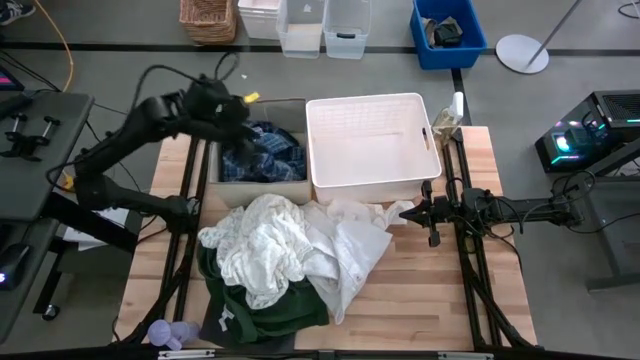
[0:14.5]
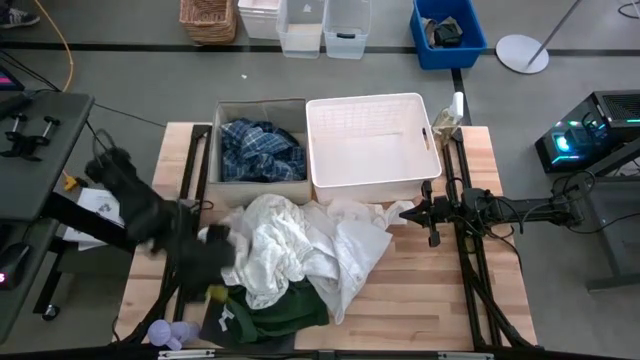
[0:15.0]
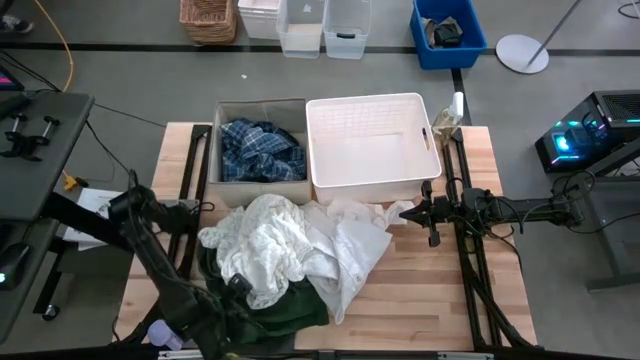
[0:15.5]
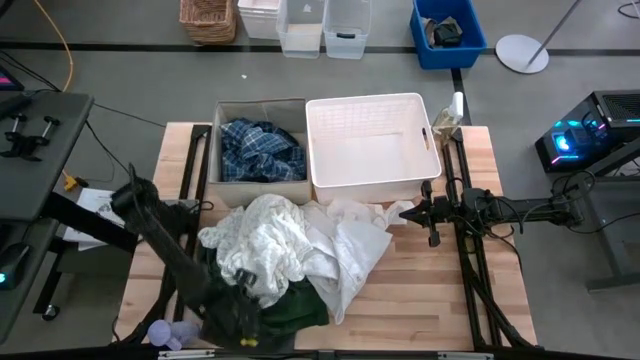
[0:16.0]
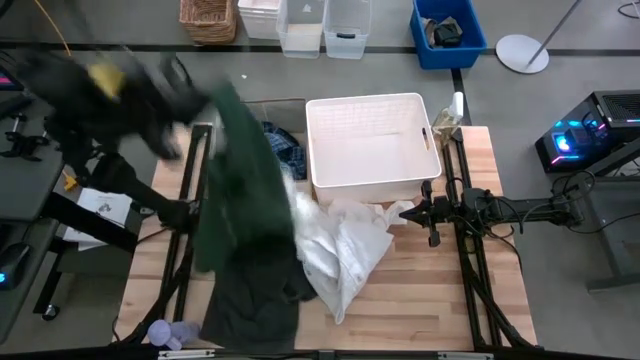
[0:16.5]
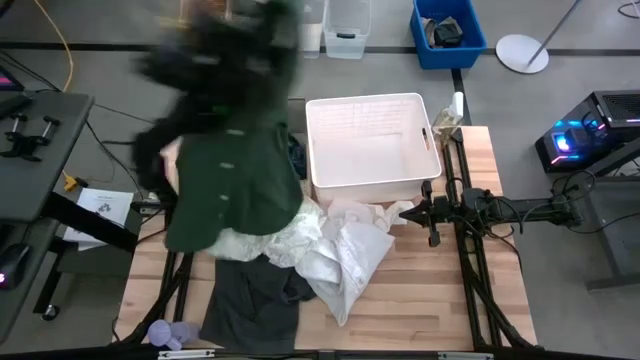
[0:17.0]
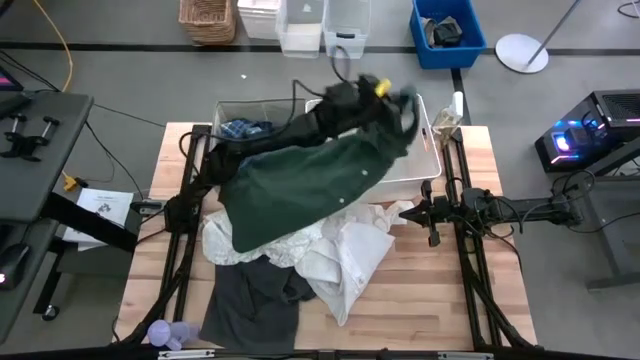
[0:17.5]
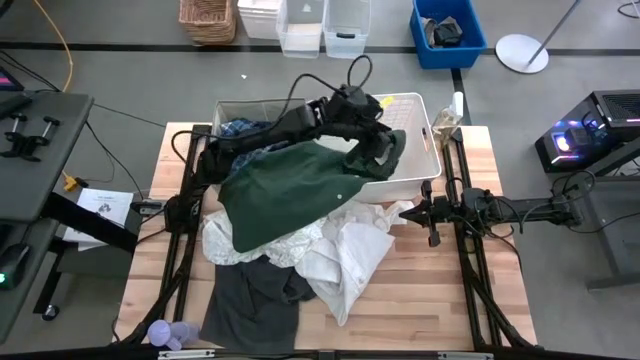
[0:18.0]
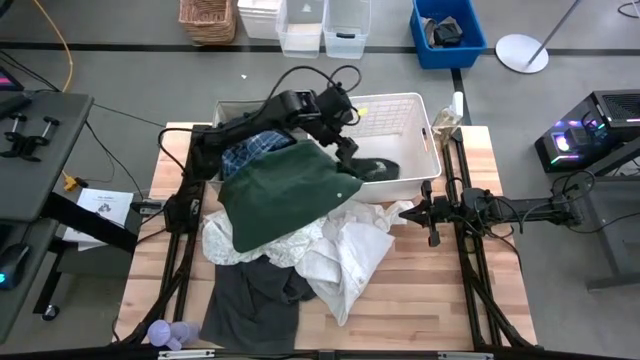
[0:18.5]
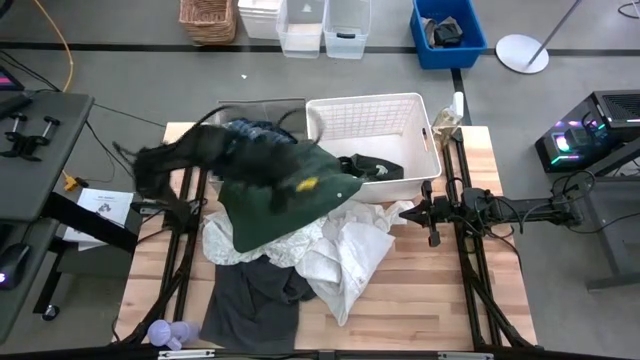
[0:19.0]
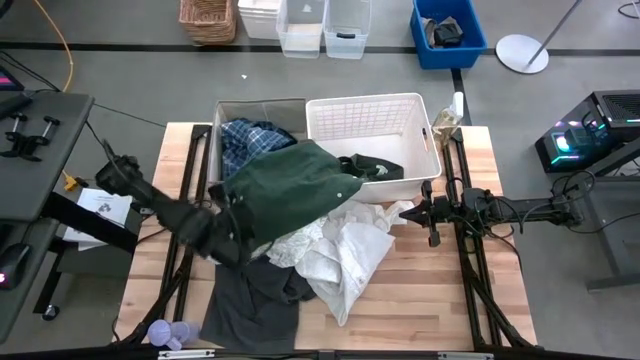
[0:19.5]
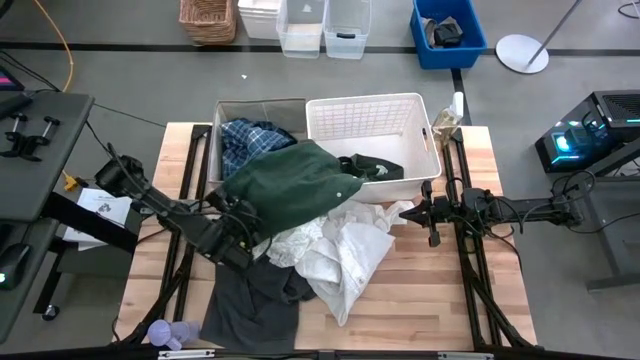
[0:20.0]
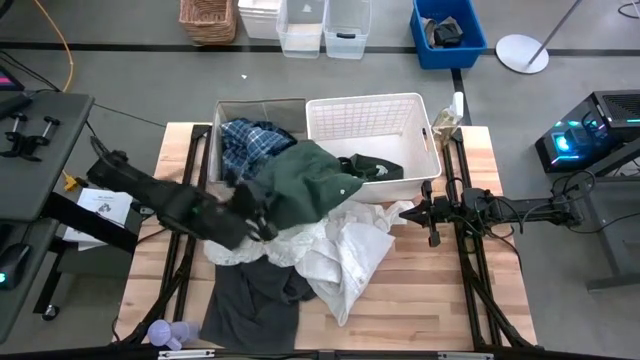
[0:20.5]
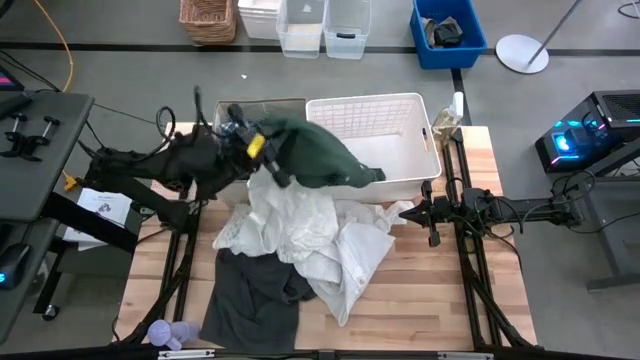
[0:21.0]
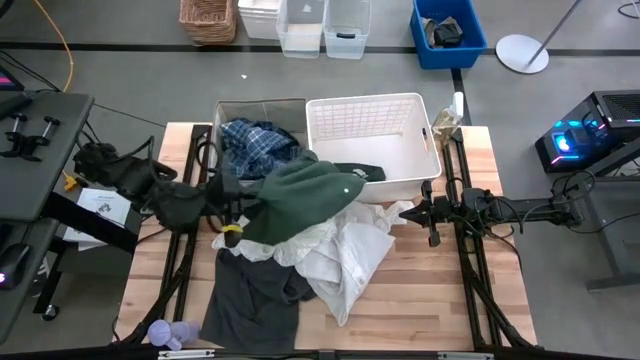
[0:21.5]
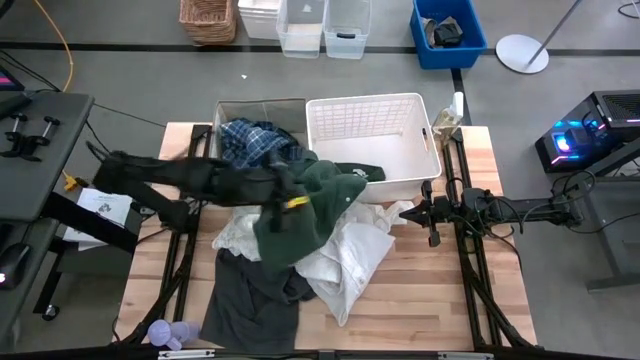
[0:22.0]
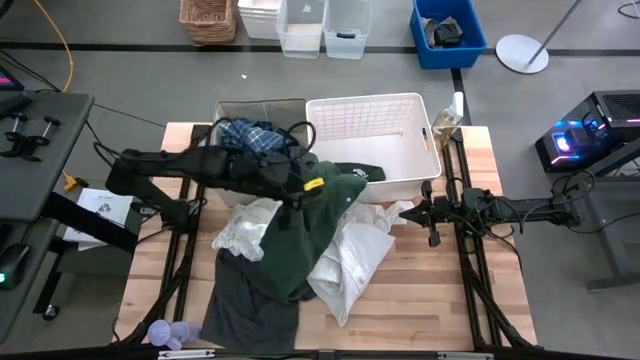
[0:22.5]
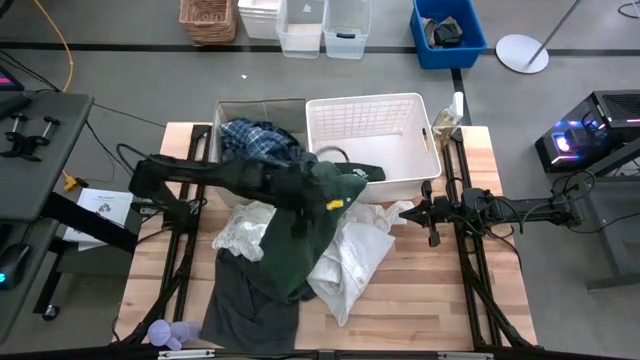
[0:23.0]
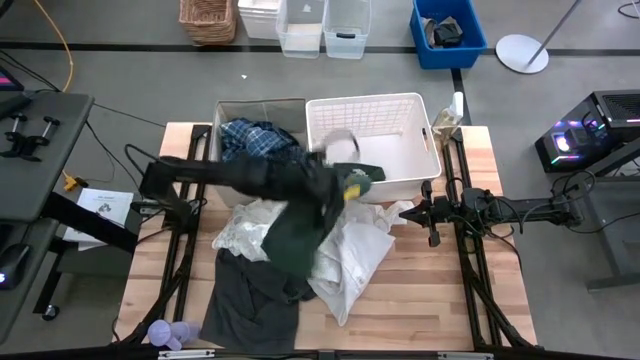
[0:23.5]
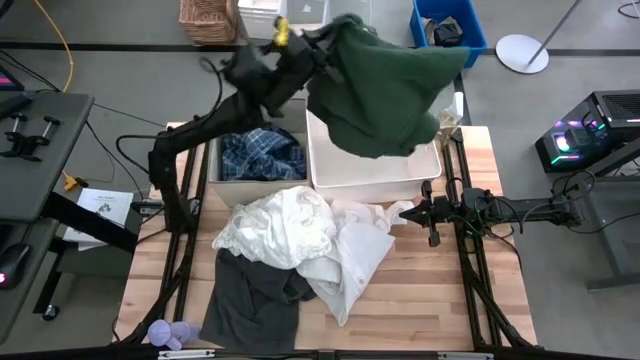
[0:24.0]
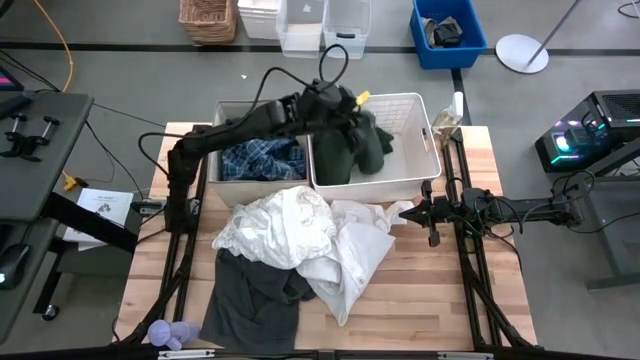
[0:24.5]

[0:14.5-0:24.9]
Task: Sort clothes
Put the green shirt into the laundry organizer

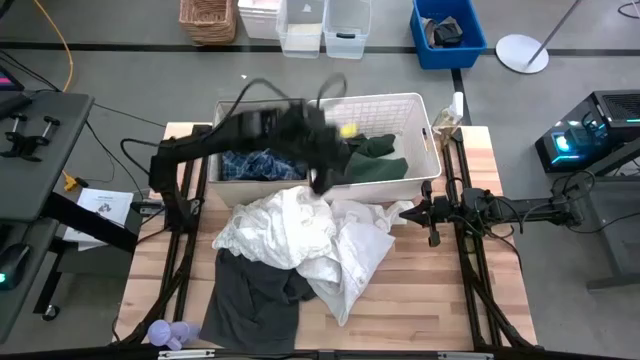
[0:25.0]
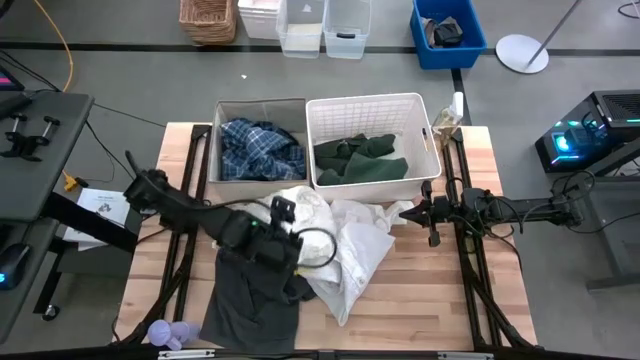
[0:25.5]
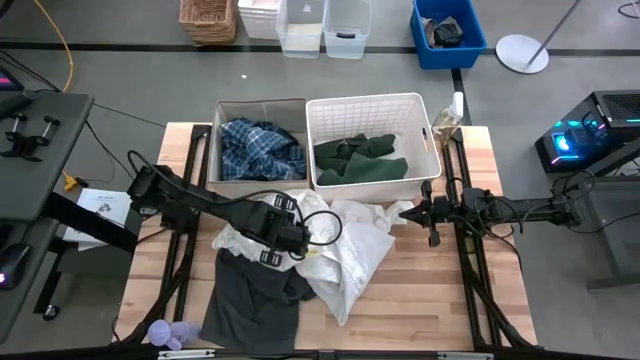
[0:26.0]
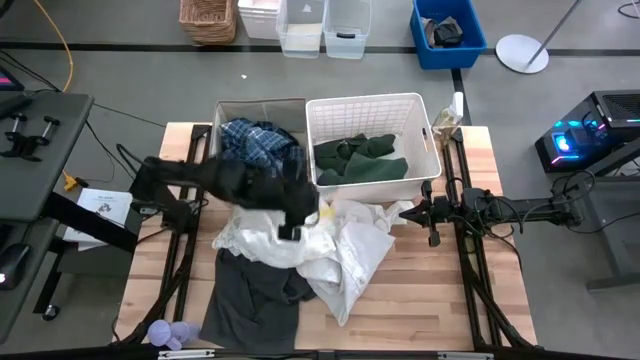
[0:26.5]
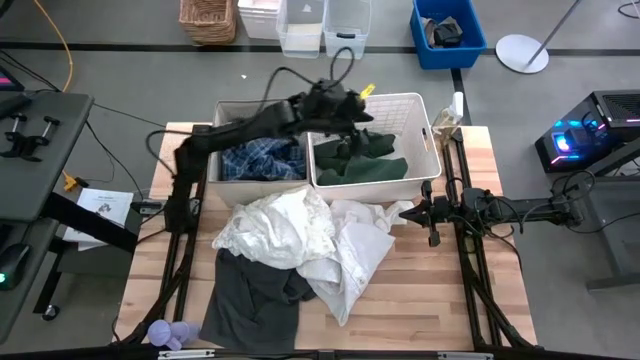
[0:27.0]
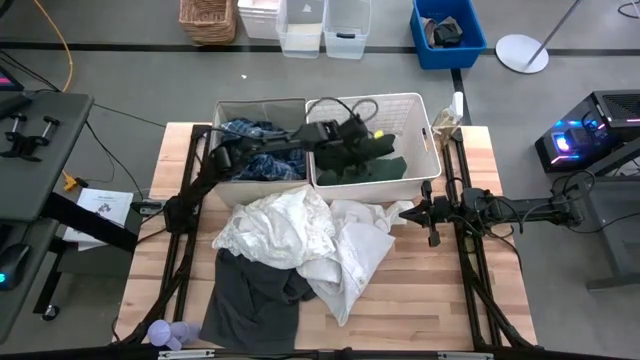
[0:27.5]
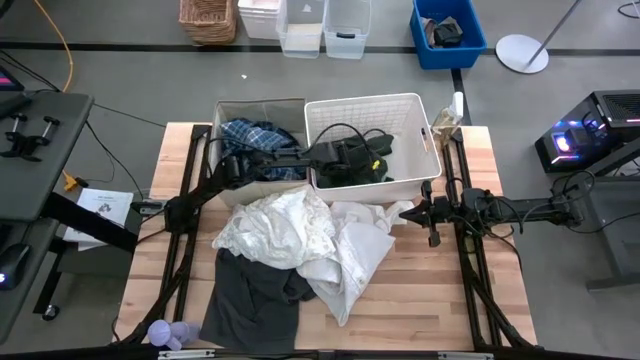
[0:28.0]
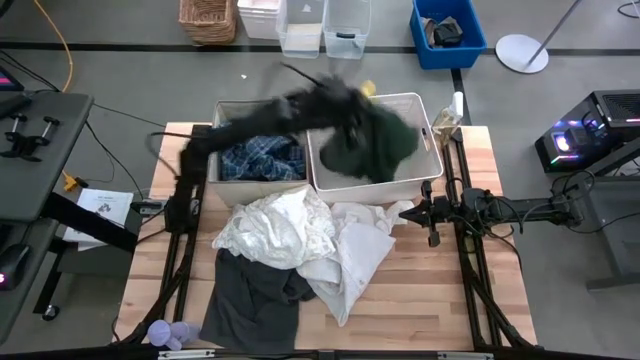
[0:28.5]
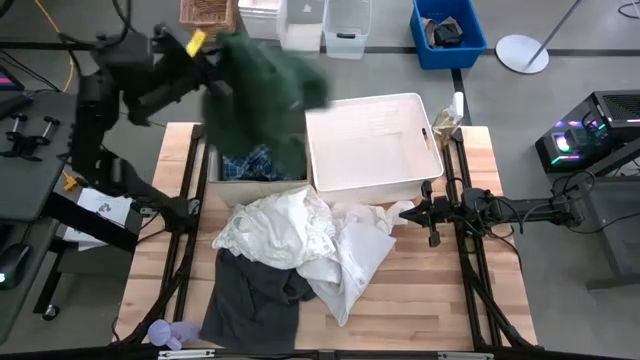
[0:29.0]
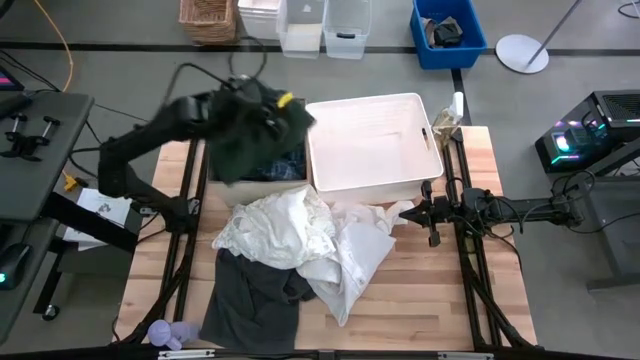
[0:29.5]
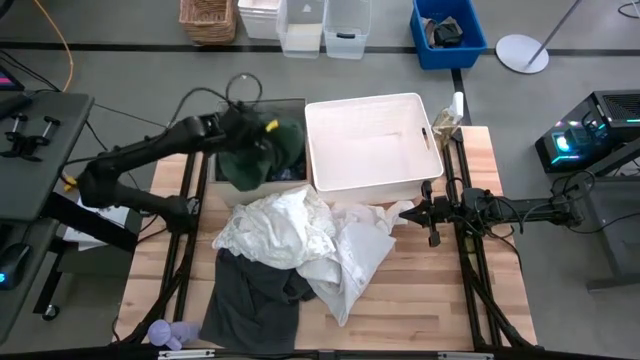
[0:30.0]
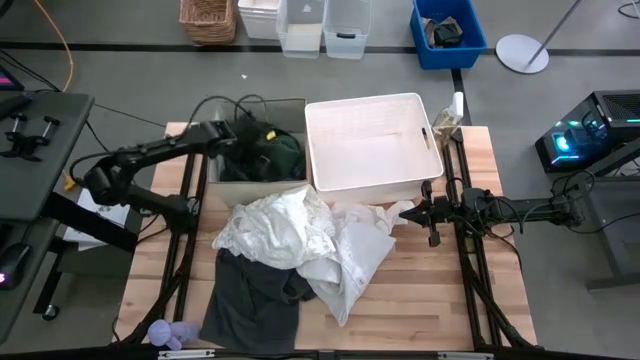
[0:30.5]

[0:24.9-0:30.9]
Put the green shirt into the laundry organizer

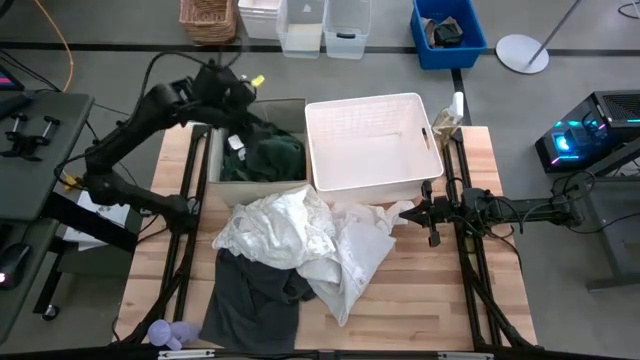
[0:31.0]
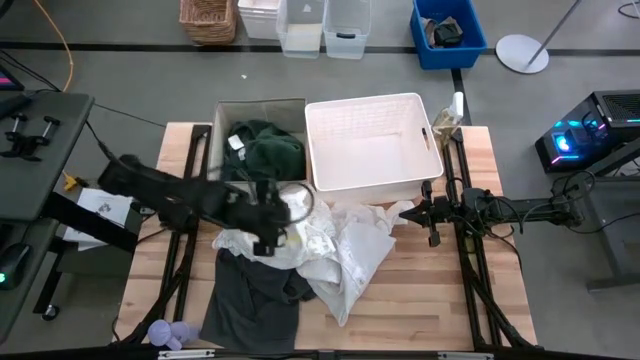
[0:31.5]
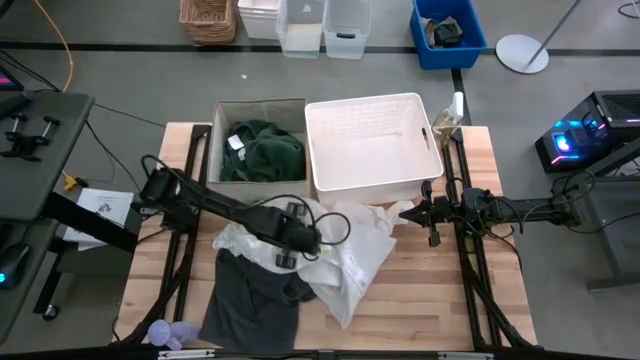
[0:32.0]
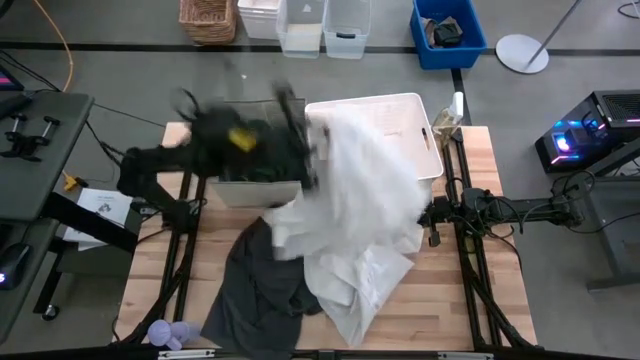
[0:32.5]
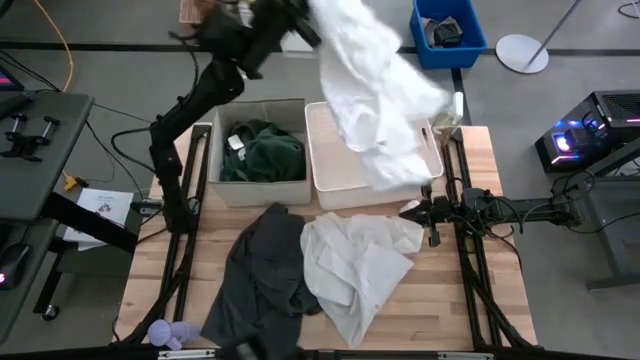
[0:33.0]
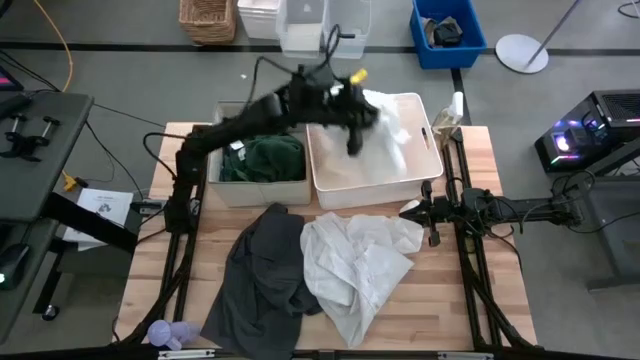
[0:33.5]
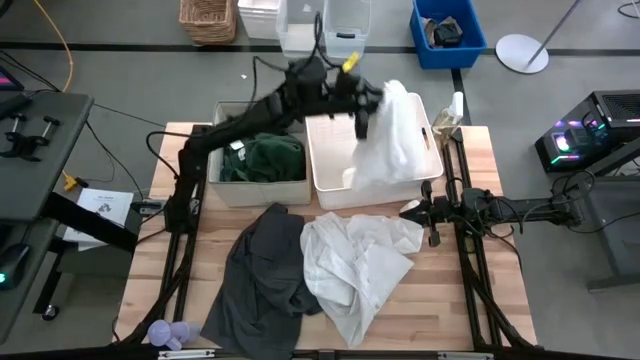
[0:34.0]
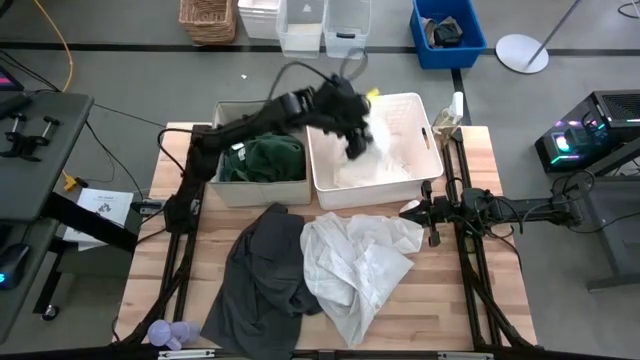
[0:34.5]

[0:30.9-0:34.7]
Put the white cloth into the white bin

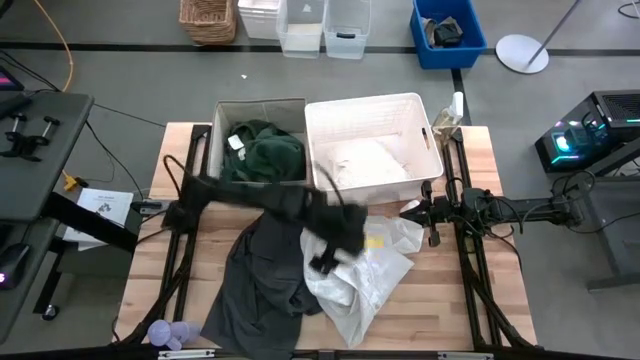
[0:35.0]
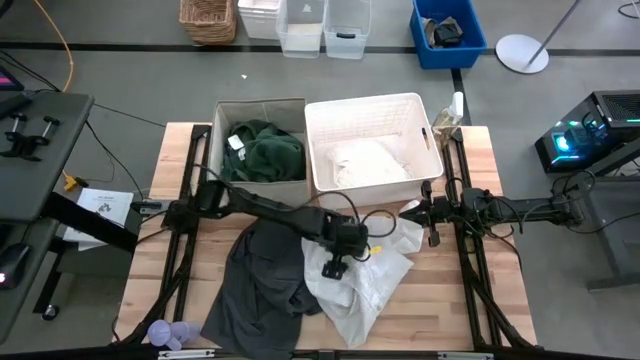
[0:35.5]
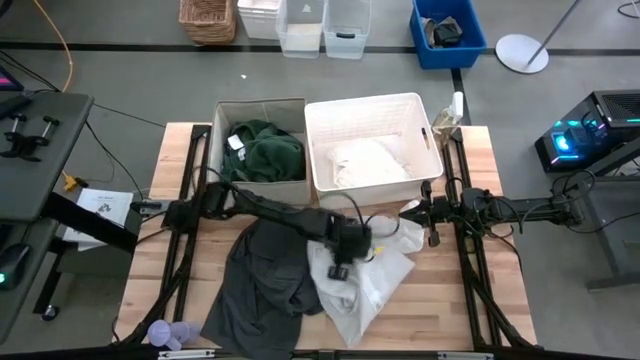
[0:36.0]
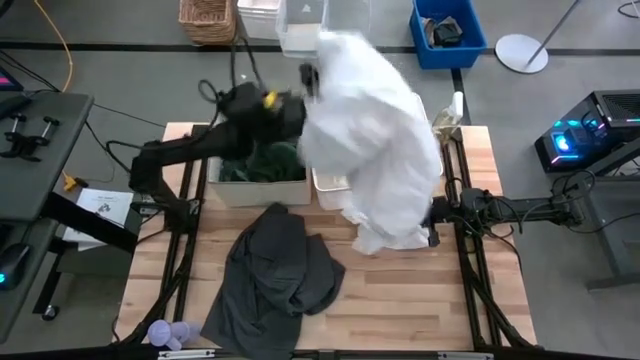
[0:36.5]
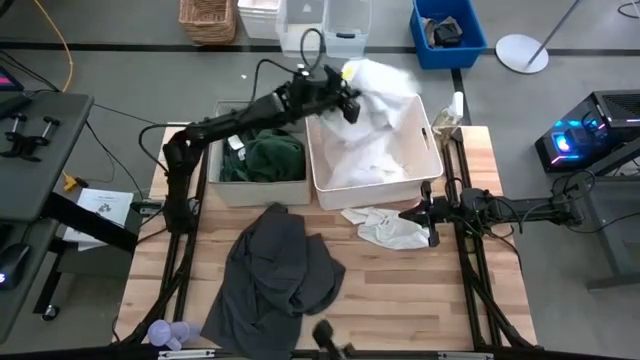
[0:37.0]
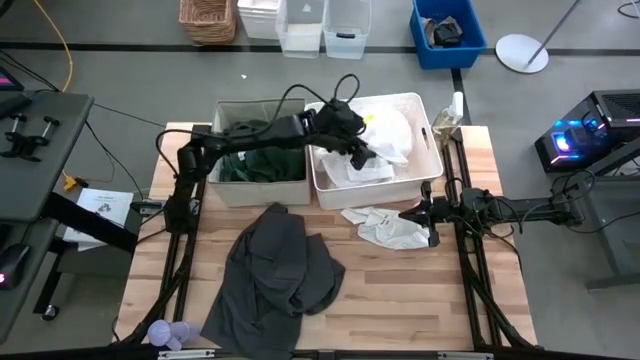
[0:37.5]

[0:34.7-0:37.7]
Put the white cloth into the white bin
